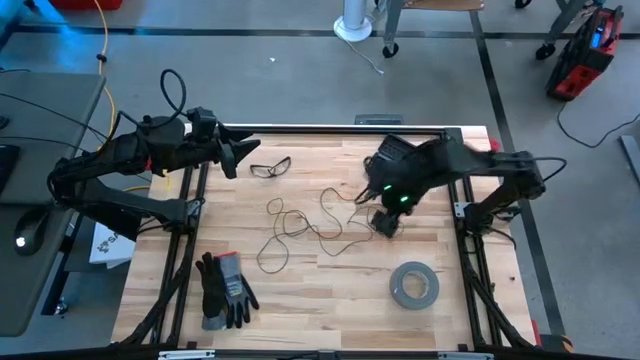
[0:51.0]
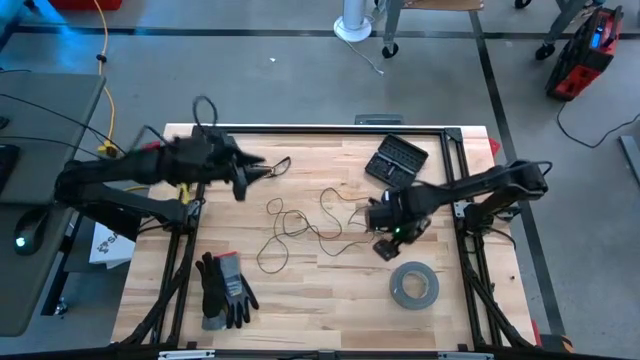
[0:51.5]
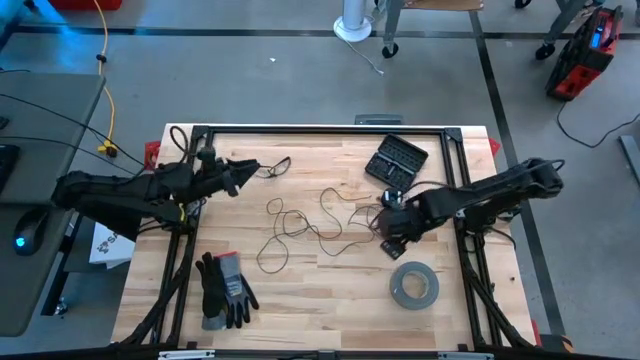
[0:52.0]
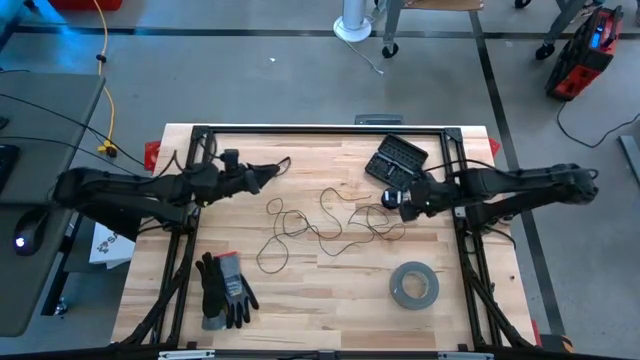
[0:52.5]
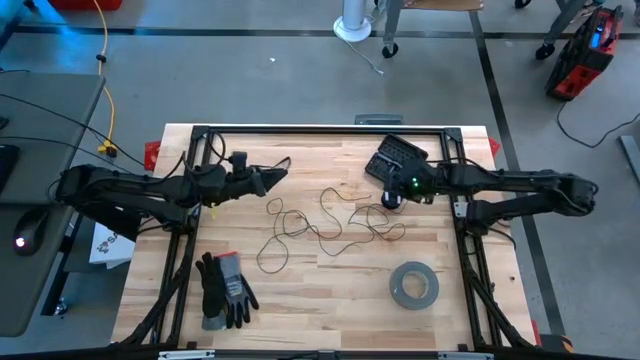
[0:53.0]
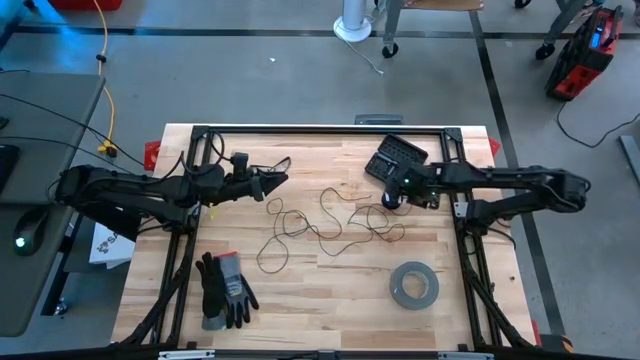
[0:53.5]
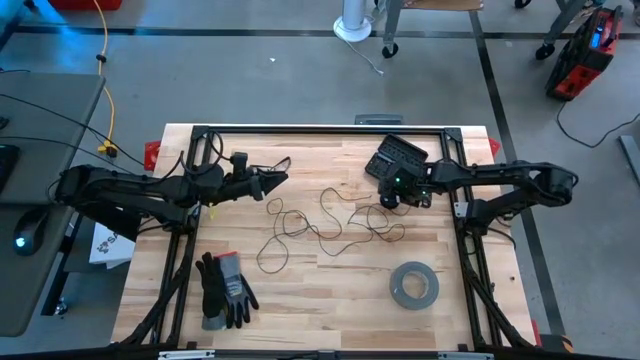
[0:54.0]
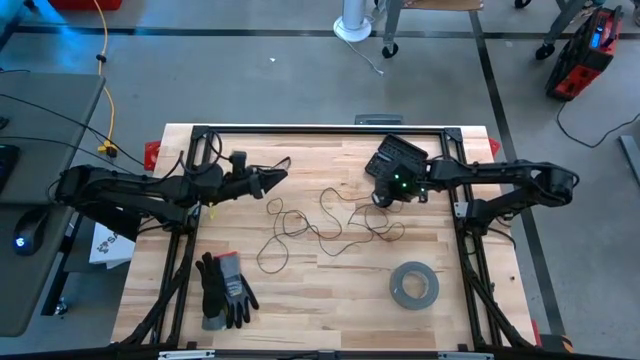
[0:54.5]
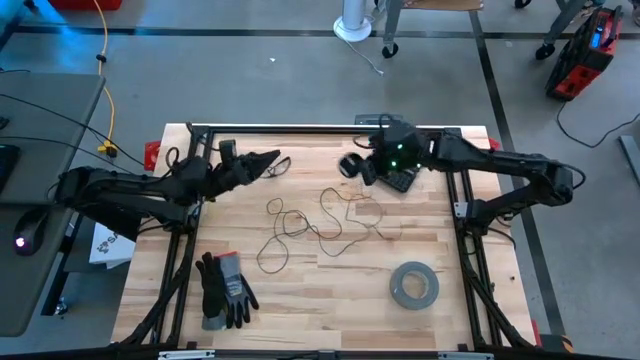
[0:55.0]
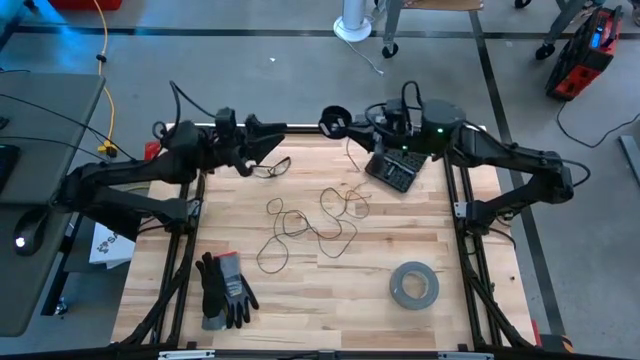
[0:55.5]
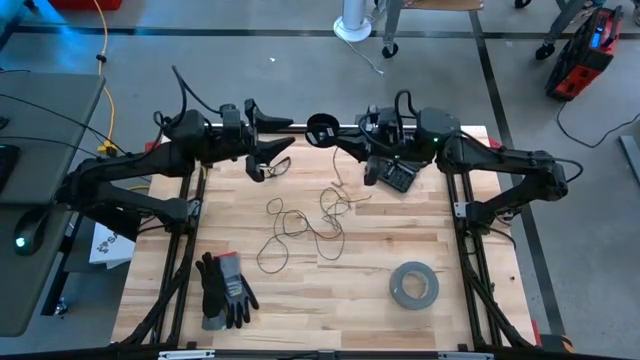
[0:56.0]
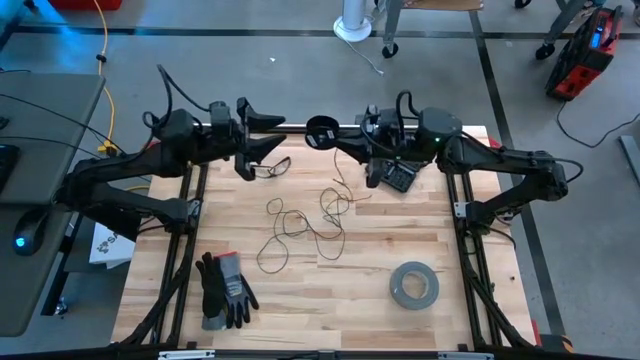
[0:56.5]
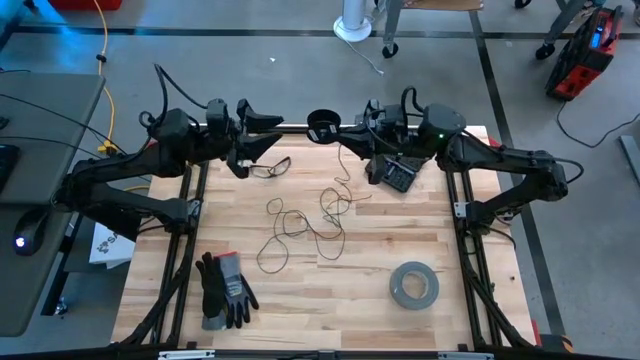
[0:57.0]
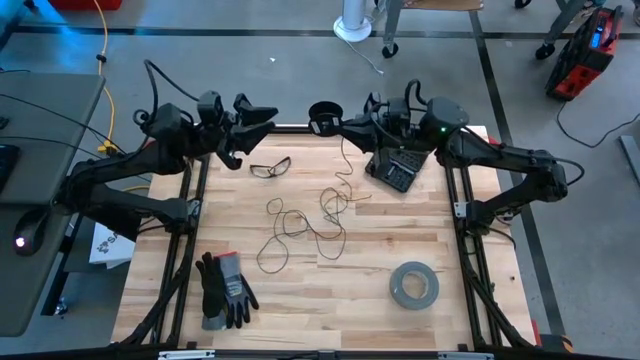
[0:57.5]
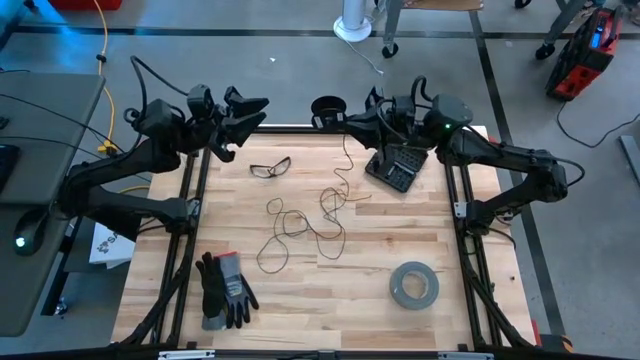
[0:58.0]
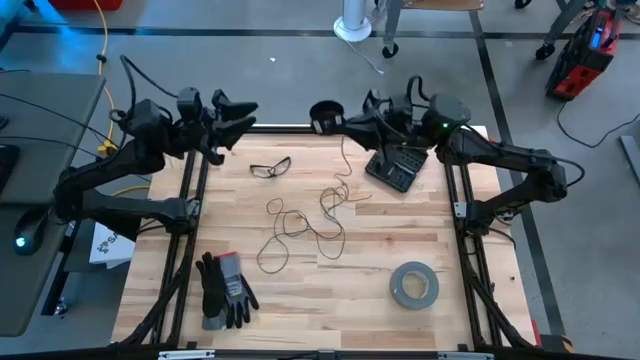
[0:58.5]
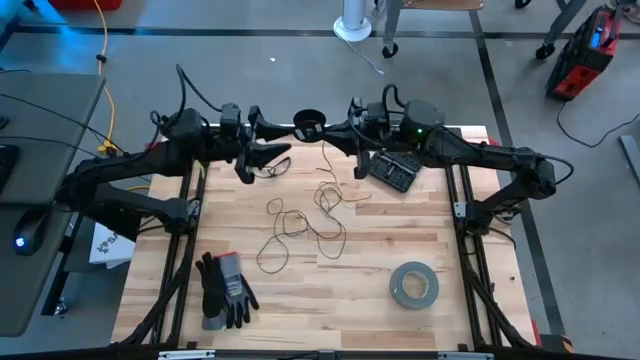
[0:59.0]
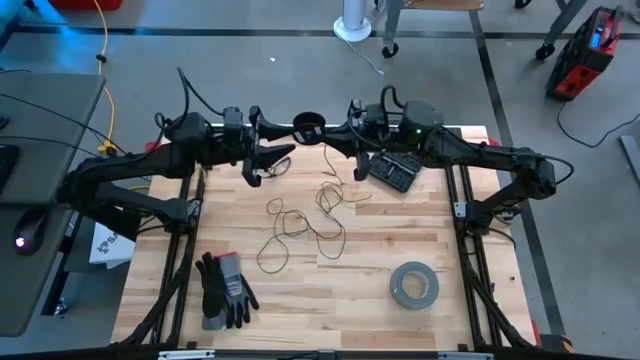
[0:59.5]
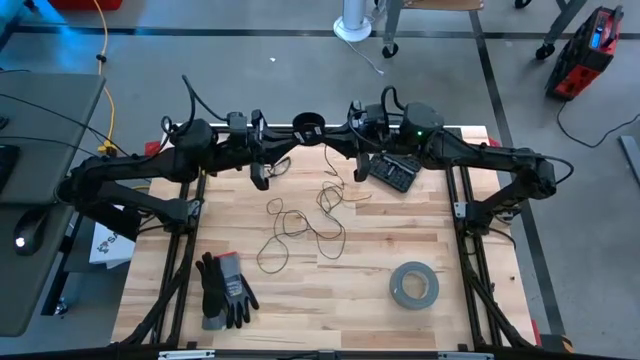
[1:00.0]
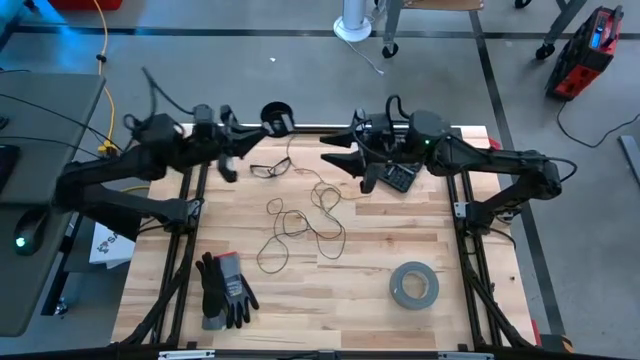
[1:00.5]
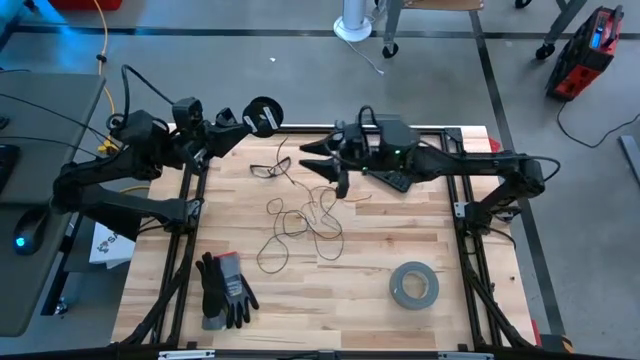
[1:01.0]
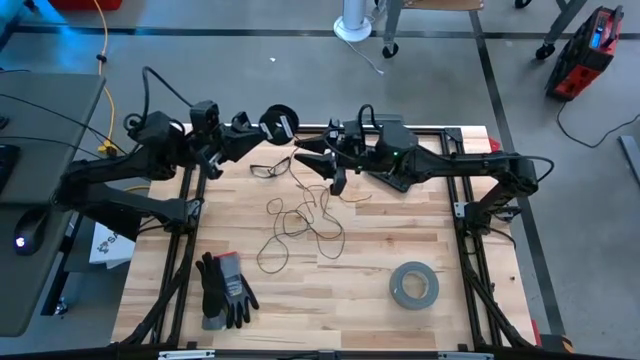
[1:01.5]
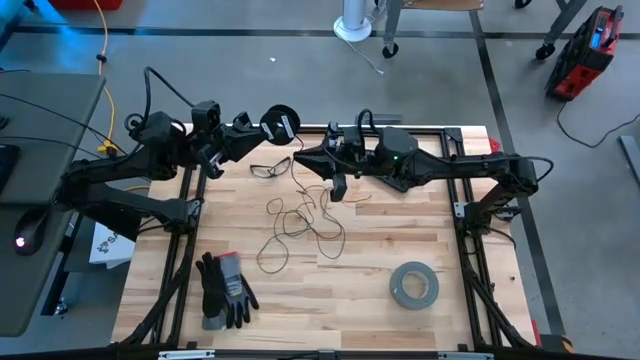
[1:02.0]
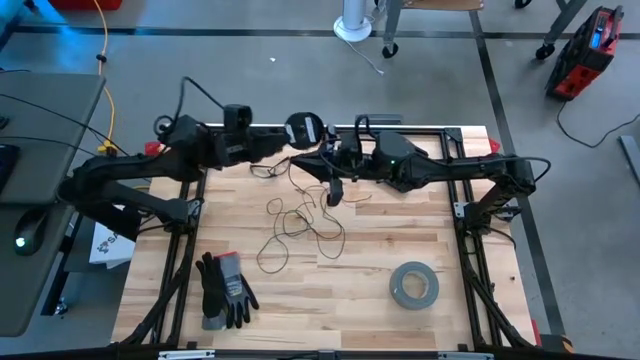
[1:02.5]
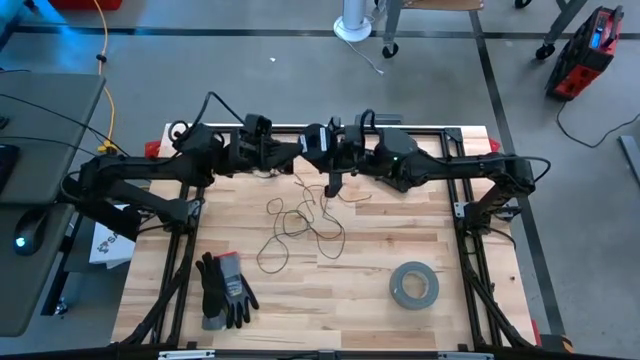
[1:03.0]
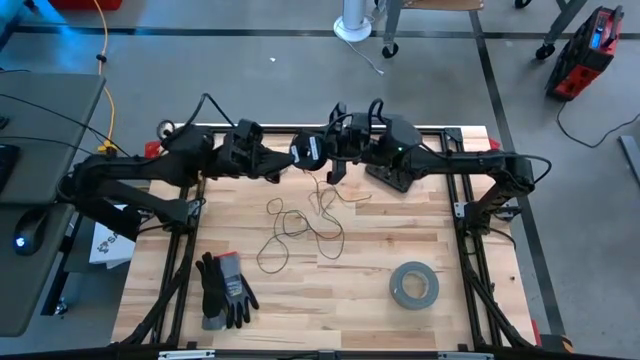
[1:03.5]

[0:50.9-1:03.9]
Task: Coil cords
Coil the black wire on the black spool
